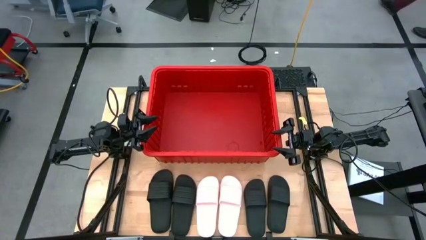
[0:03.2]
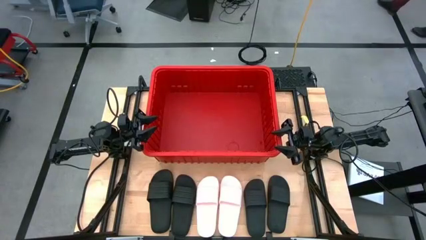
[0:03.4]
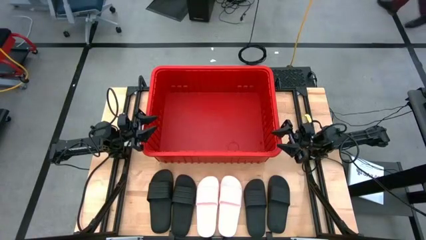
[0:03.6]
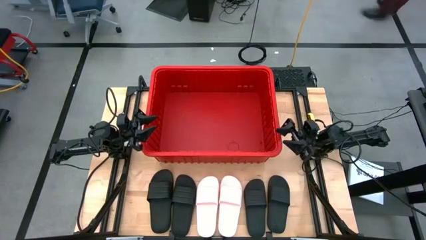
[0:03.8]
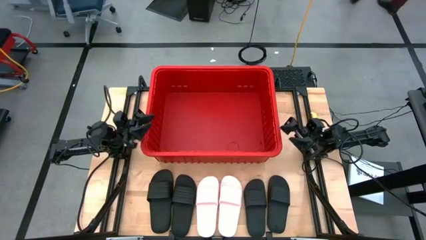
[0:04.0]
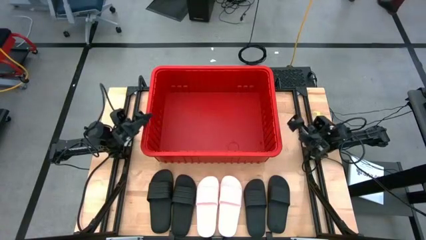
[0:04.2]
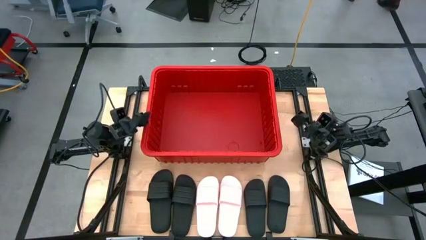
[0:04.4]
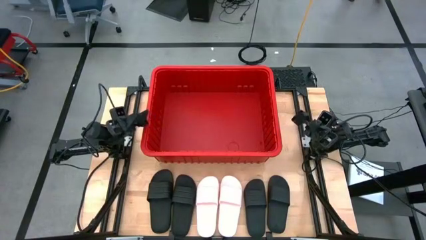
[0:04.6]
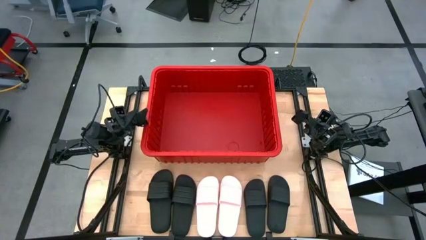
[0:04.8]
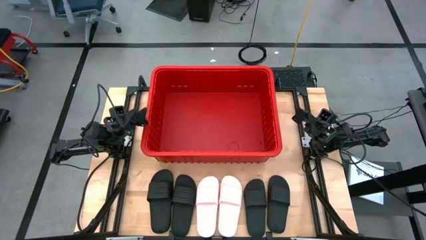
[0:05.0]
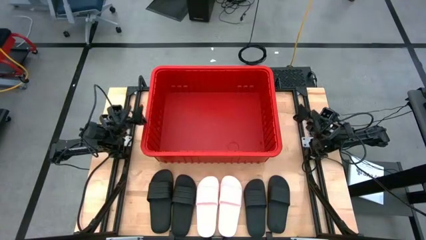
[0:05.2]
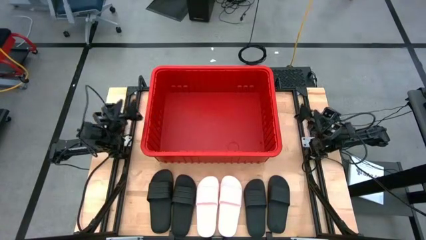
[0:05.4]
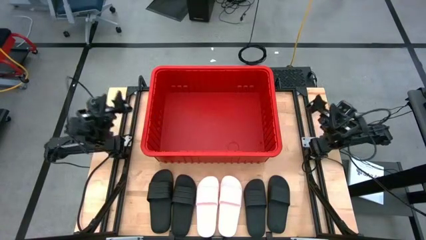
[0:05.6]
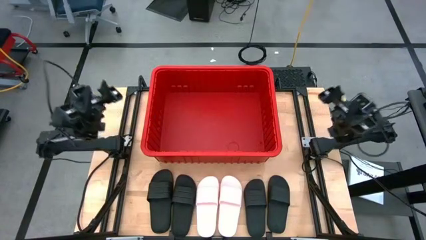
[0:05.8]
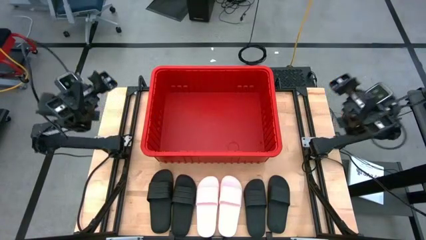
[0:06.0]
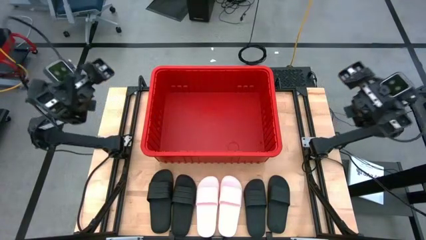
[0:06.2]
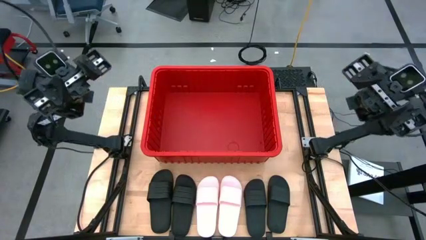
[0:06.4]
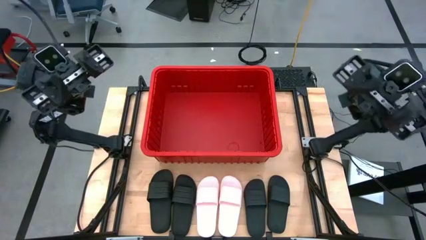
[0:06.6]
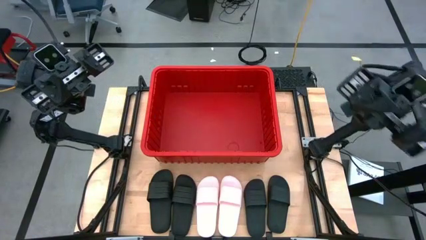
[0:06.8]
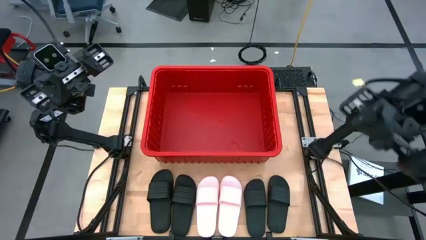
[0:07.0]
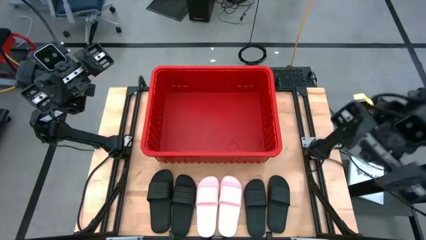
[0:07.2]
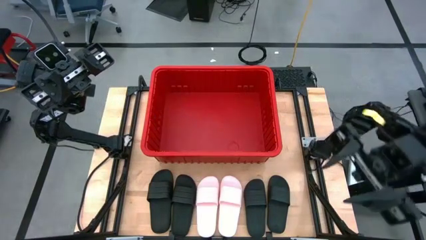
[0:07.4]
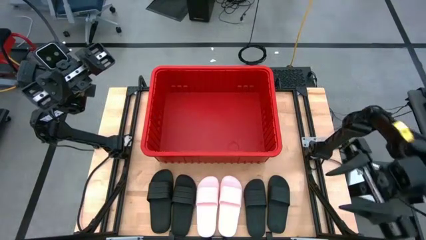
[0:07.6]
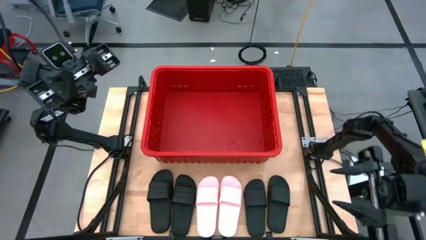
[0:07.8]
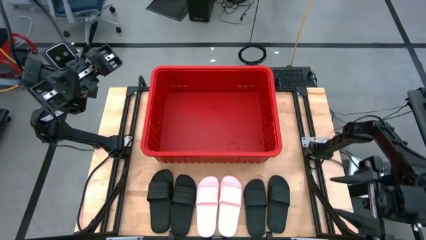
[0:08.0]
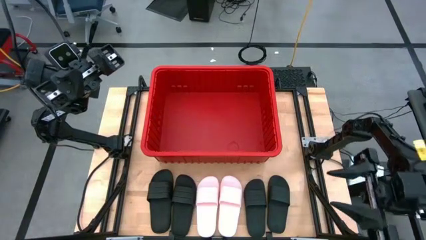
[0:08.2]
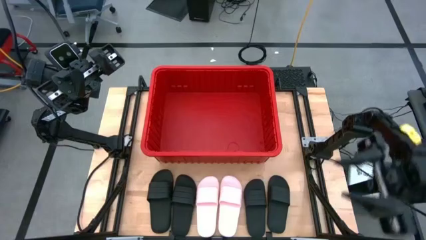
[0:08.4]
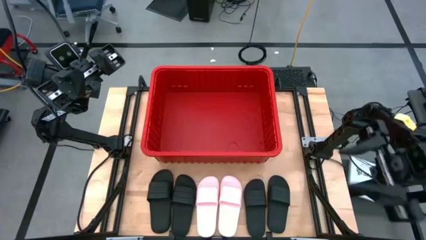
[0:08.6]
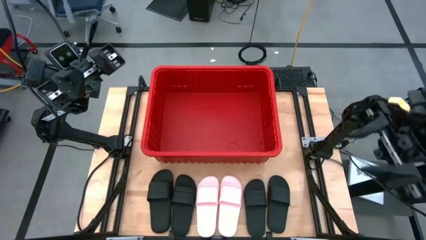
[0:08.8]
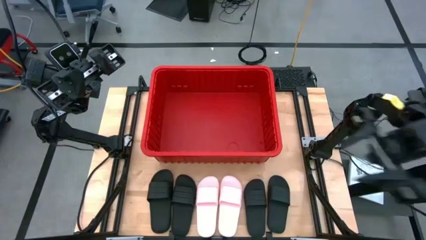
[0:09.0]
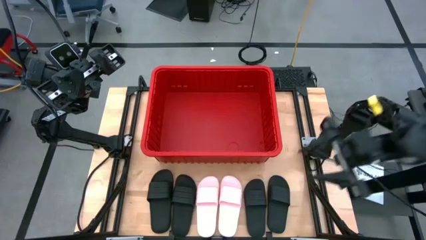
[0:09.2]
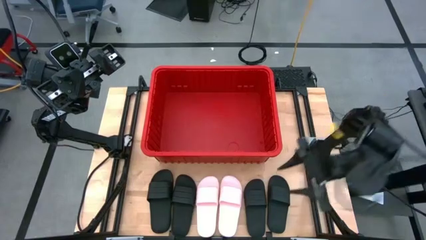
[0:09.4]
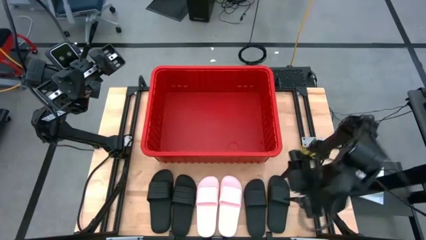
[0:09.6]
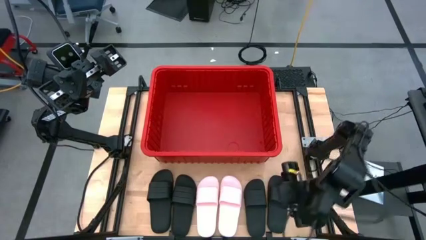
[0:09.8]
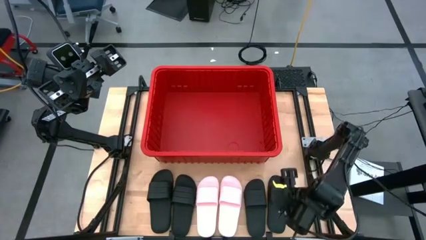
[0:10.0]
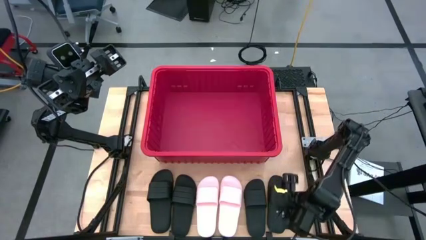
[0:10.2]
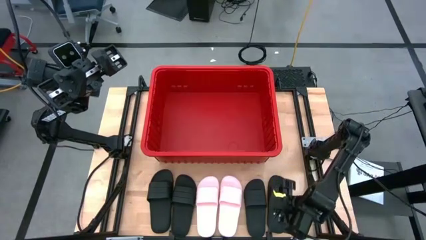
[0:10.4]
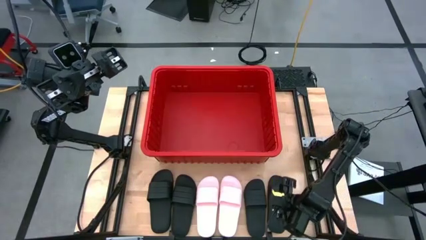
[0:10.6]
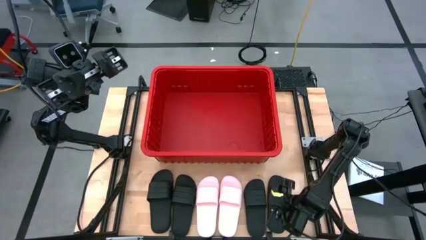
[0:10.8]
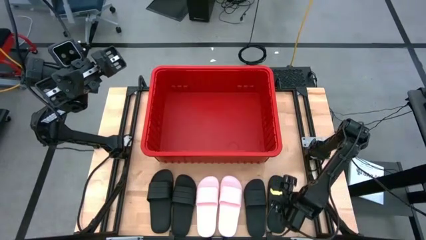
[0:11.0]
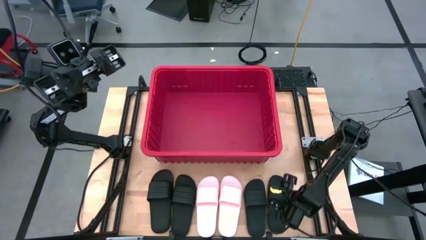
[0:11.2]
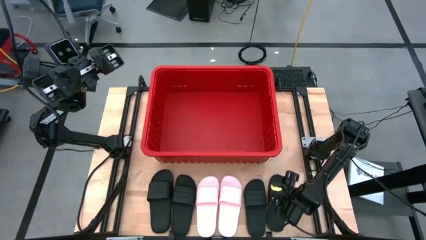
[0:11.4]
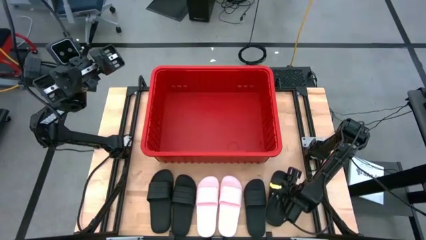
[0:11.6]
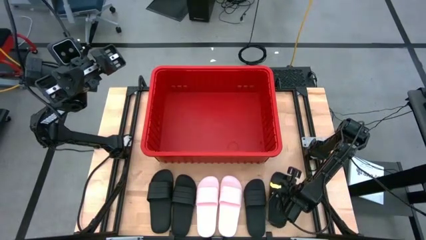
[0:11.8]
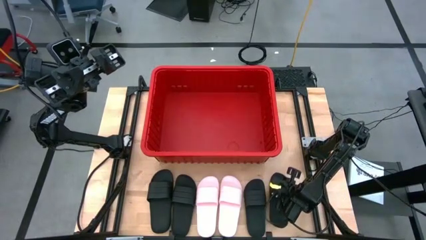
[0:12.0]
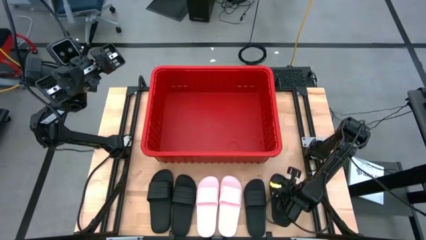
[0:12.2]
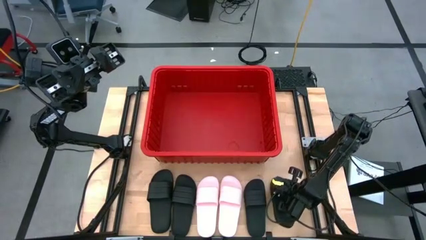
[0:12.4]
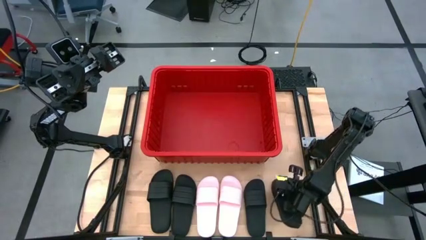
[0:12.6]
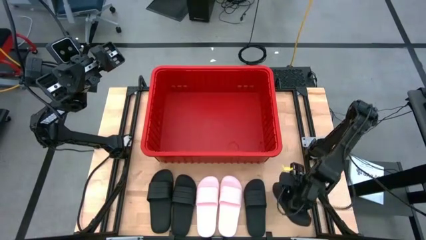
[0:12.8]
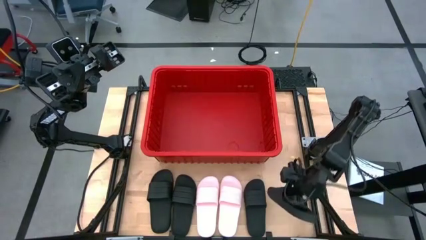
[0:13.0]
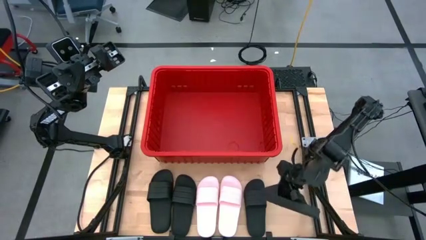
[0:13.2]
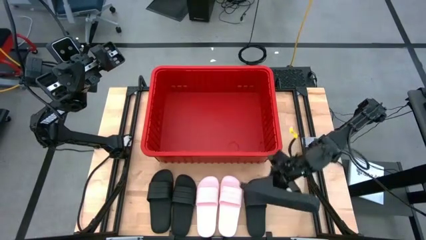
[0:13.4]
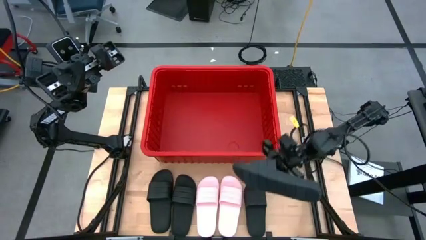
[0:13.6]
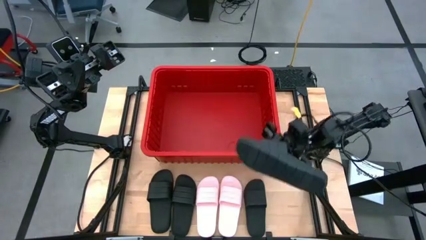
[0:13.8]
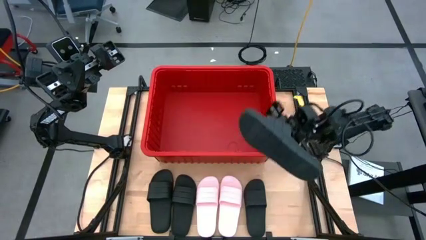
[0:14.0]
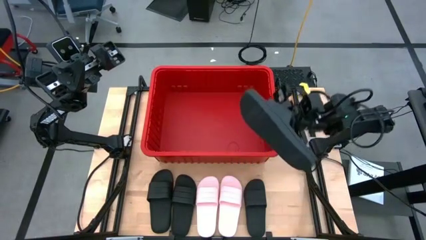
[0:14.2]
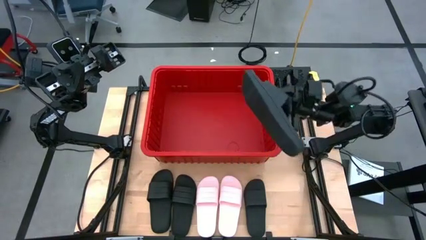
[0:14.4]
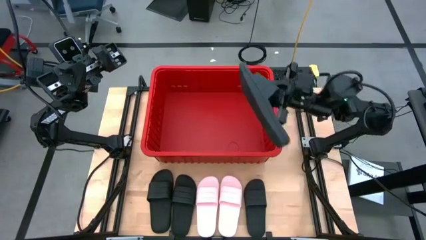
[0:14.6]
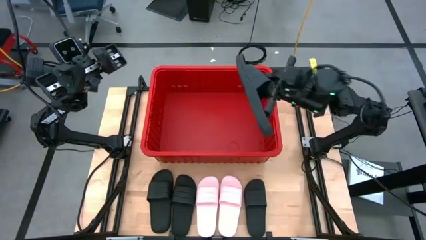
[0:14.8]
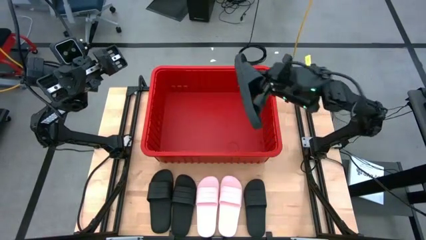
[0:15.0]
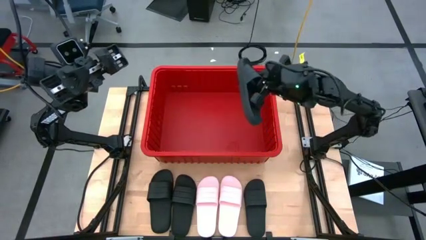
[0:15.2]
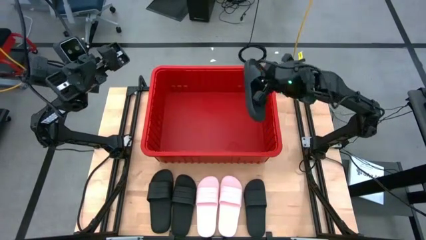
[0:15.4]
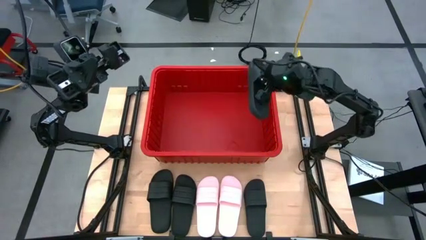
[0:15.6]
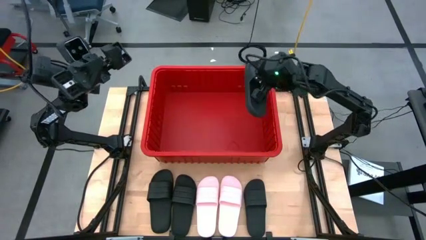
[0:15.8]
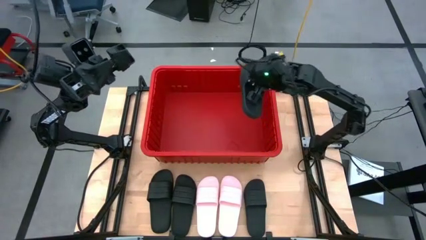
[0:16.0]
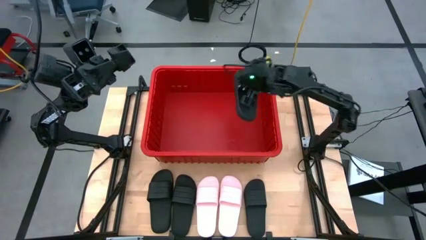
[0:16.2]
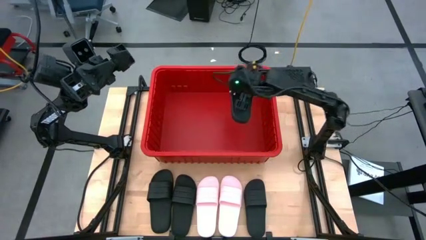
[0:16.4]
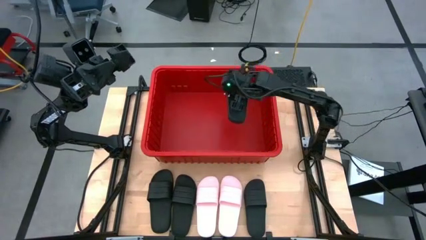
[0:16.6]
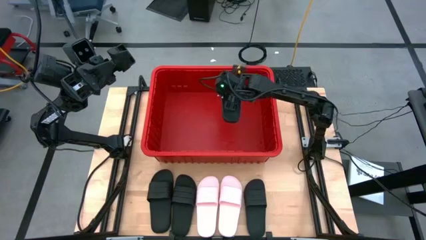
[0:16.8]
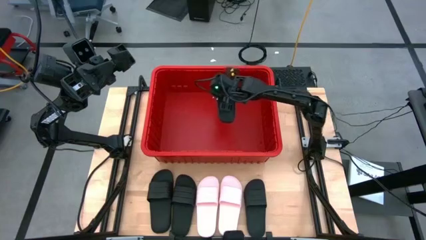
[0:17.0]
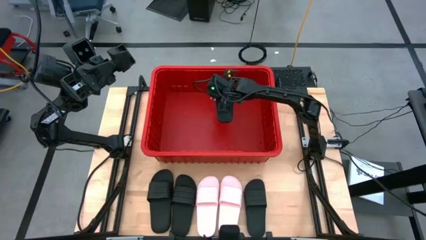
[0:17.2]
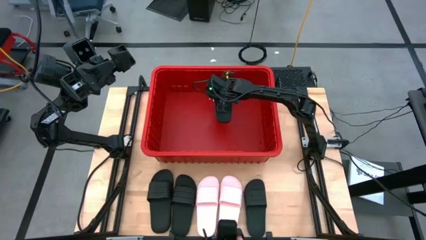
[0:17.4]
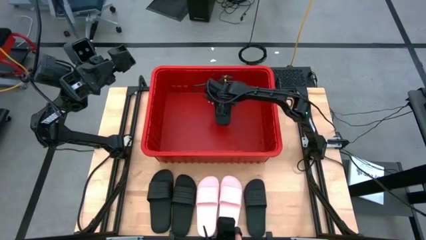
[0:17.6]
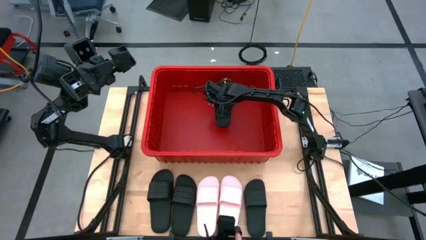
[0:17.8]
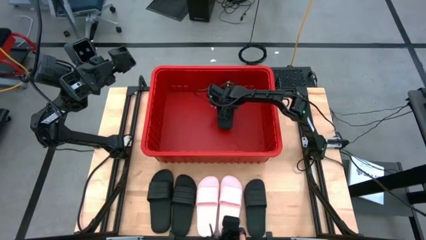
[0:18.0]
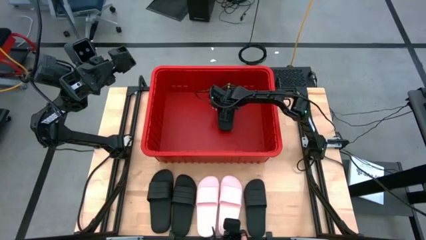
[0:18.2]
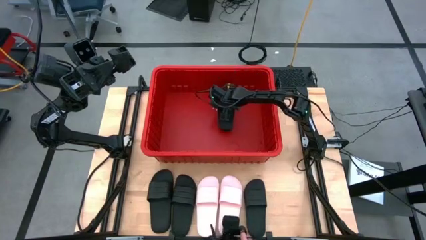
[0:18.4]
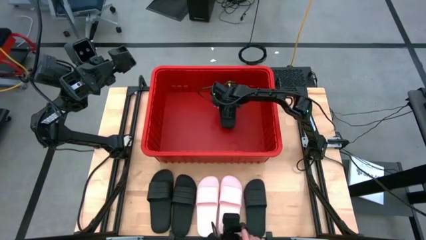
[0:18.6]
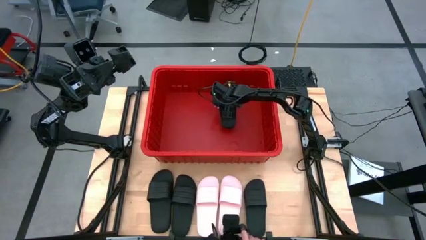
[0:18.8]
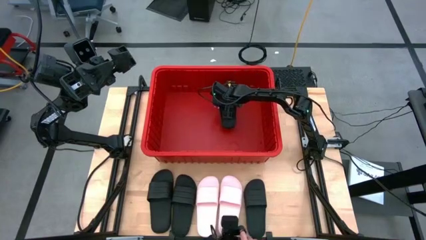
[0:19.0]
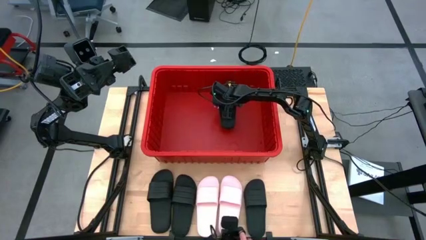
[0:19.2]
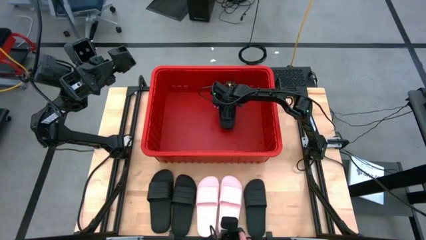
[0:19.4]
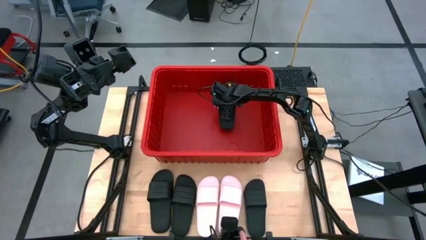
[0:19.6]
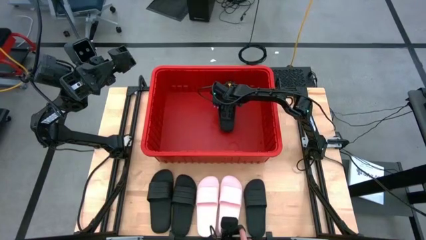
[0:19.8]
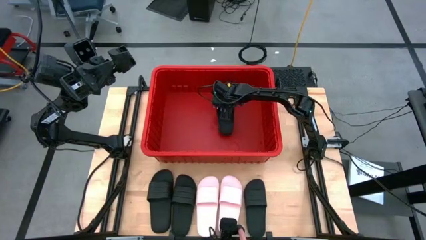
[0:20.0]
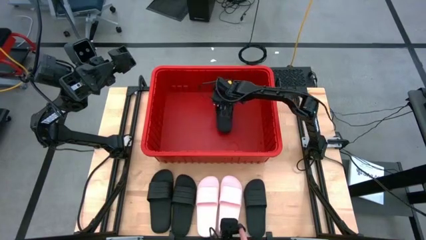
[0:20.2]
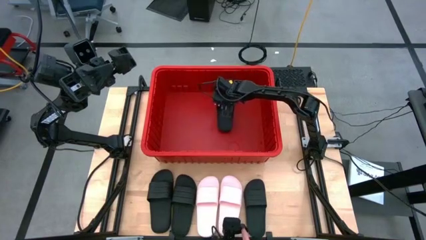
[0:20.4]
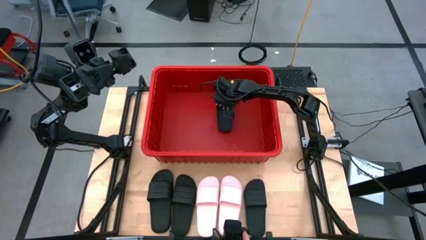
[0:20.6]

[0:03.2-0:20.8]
Task: Pick and place slides into bin
Put the black slide into the red bin
